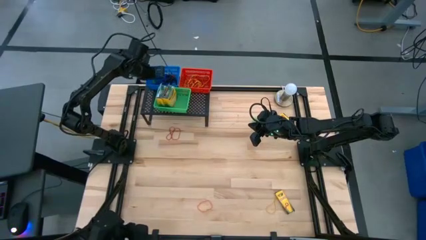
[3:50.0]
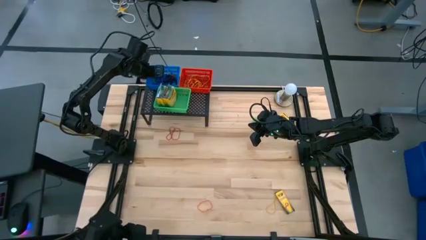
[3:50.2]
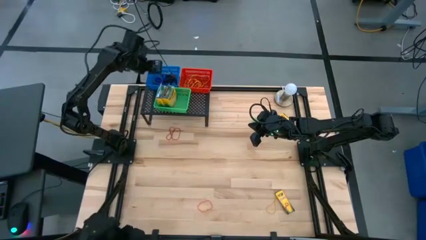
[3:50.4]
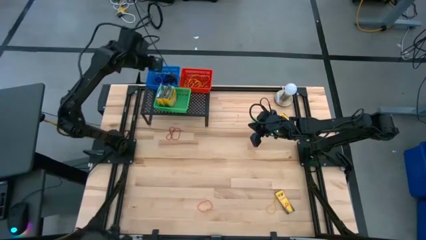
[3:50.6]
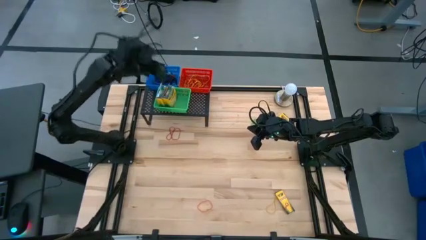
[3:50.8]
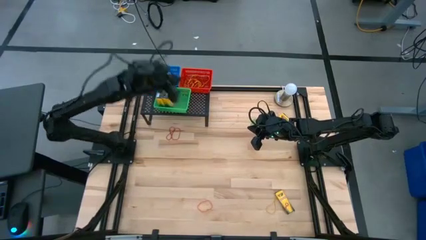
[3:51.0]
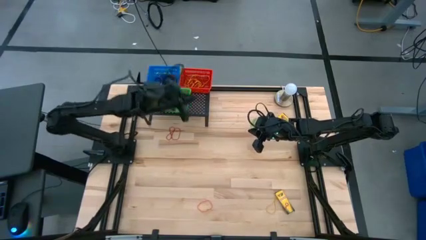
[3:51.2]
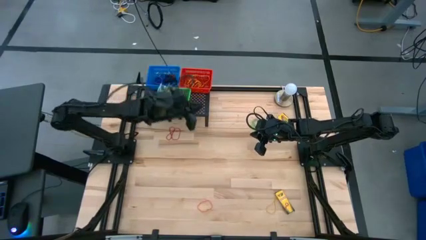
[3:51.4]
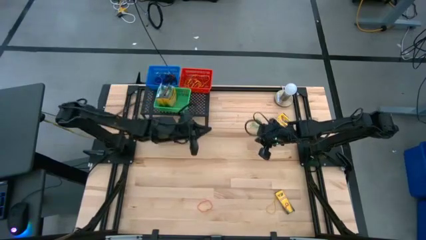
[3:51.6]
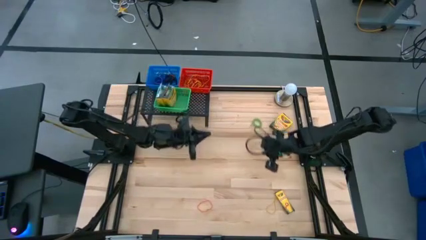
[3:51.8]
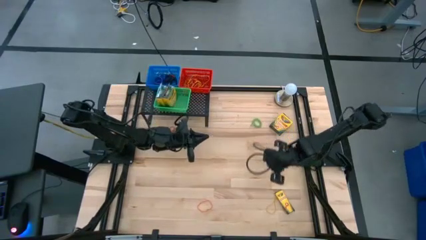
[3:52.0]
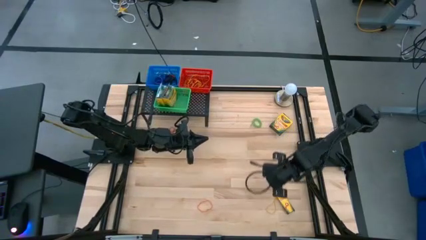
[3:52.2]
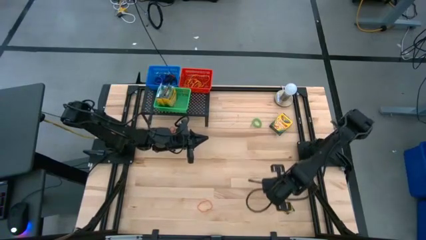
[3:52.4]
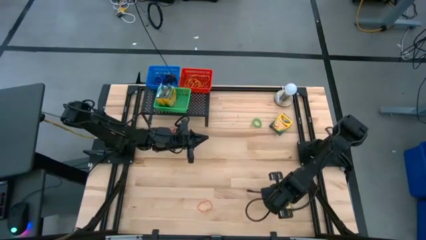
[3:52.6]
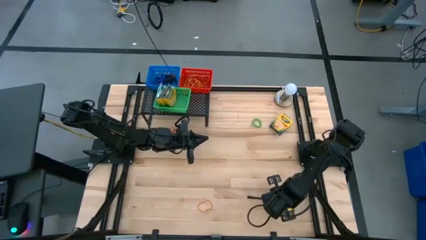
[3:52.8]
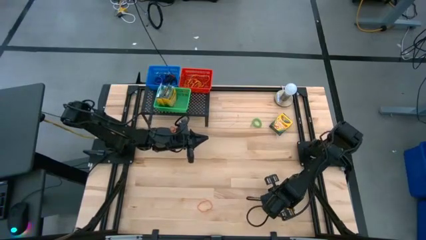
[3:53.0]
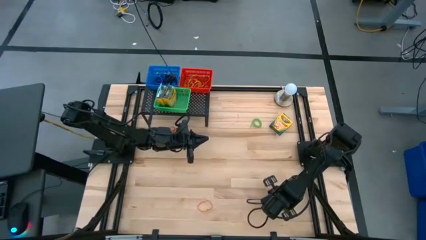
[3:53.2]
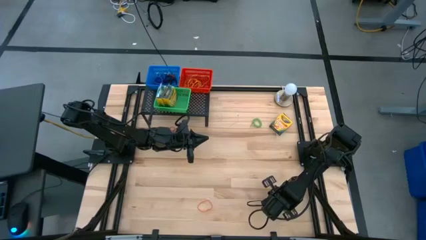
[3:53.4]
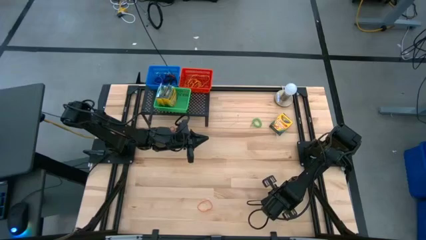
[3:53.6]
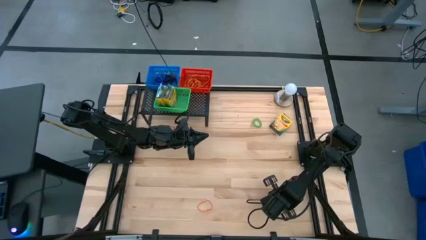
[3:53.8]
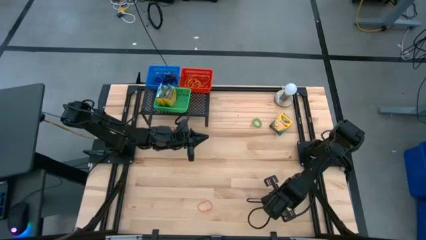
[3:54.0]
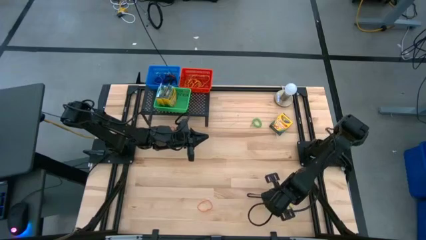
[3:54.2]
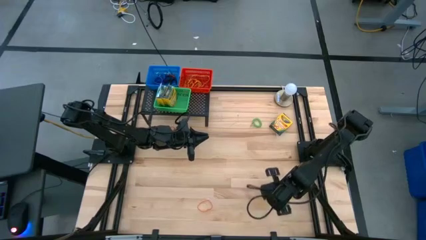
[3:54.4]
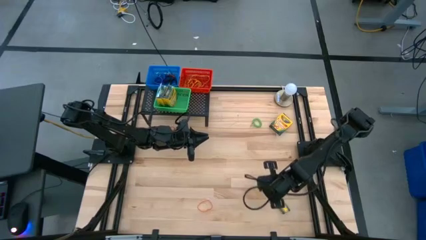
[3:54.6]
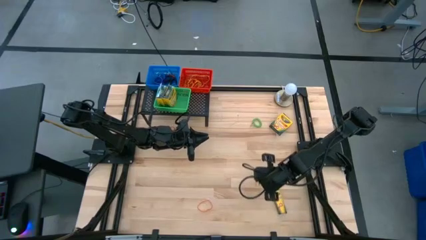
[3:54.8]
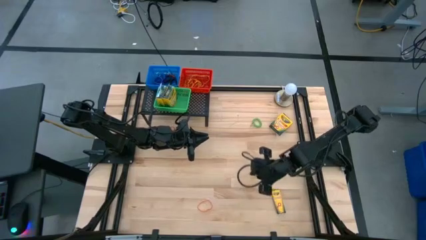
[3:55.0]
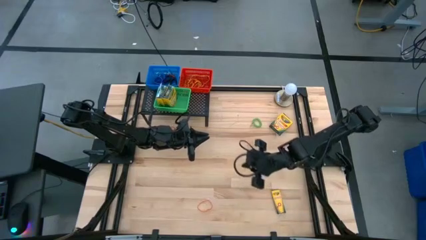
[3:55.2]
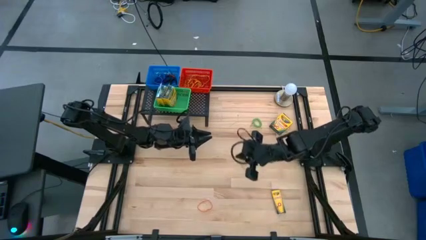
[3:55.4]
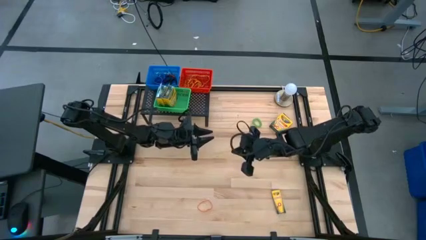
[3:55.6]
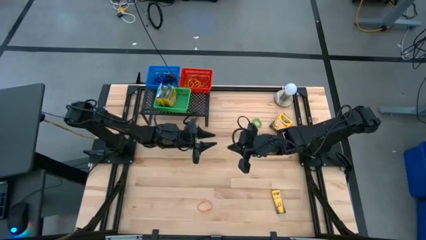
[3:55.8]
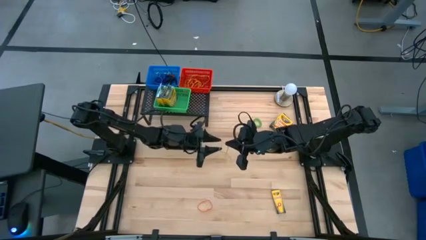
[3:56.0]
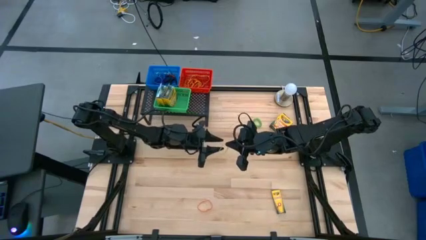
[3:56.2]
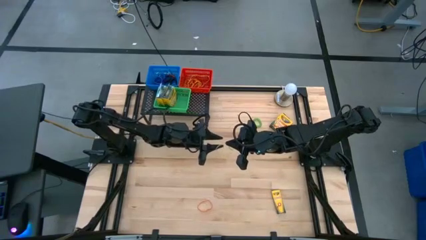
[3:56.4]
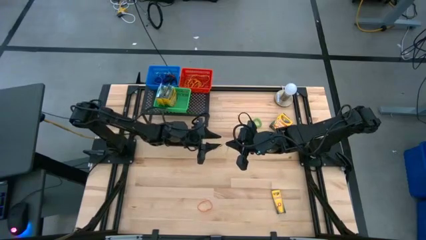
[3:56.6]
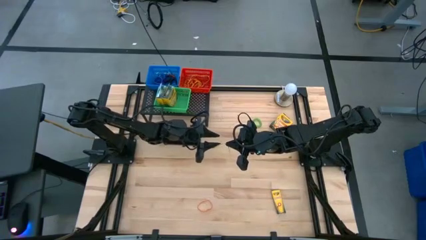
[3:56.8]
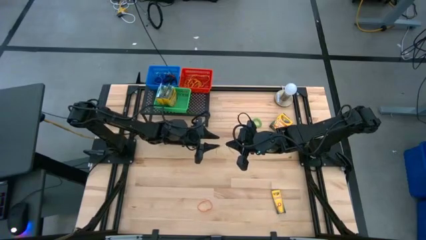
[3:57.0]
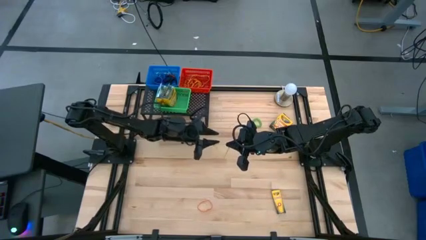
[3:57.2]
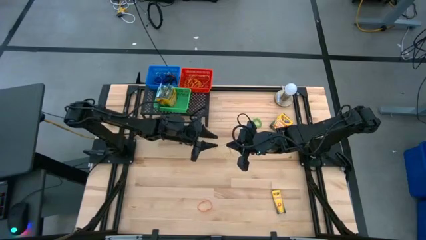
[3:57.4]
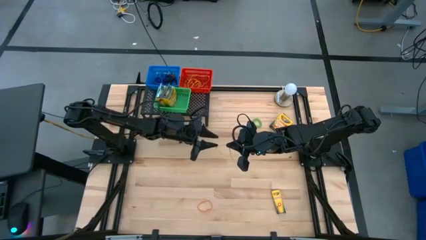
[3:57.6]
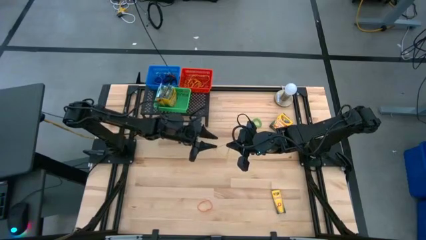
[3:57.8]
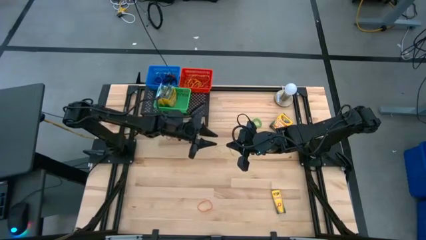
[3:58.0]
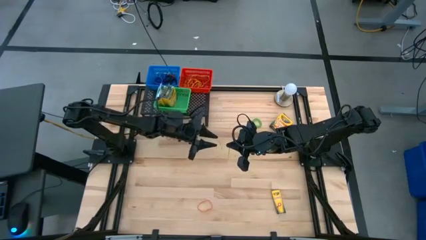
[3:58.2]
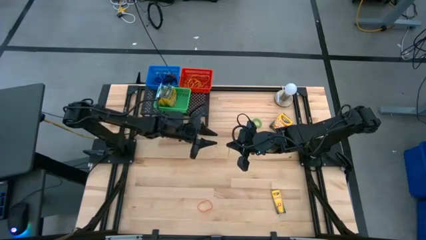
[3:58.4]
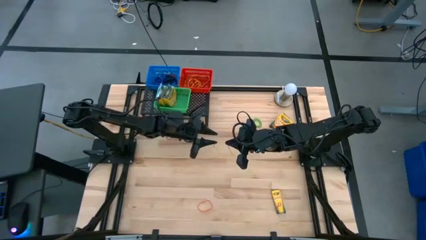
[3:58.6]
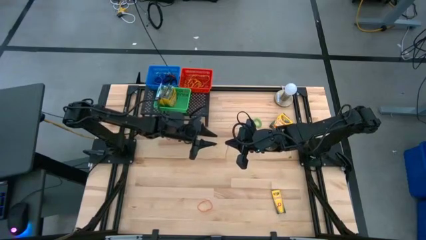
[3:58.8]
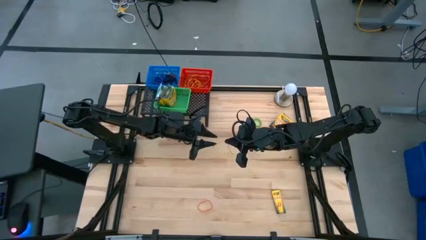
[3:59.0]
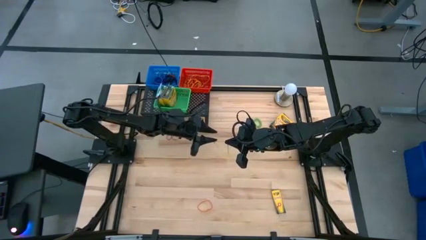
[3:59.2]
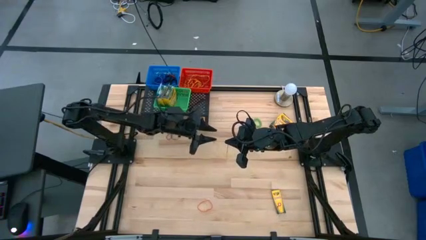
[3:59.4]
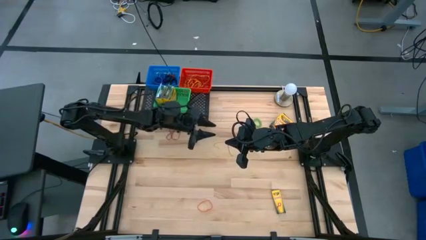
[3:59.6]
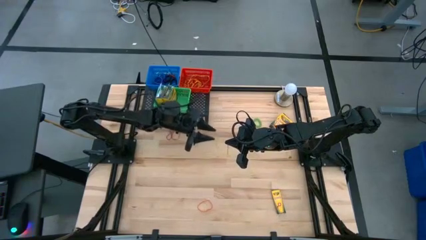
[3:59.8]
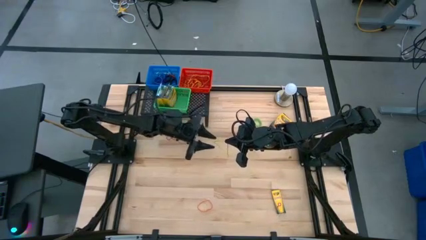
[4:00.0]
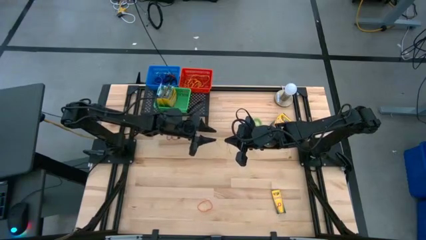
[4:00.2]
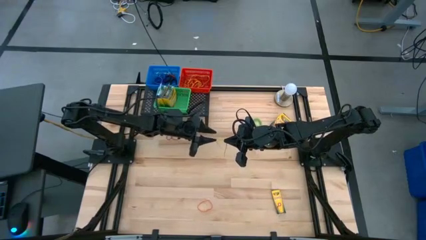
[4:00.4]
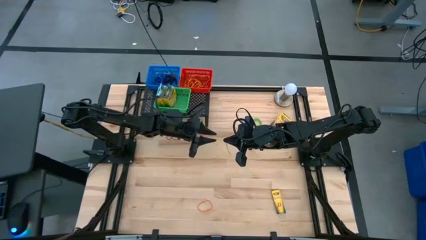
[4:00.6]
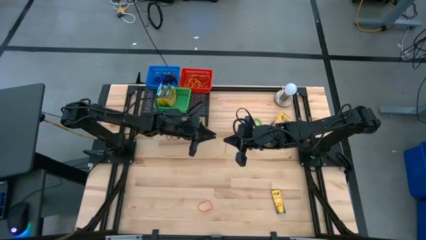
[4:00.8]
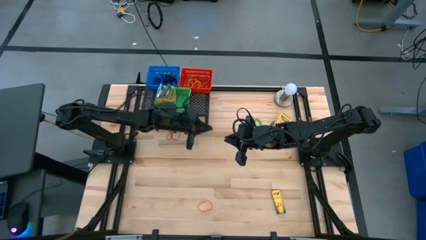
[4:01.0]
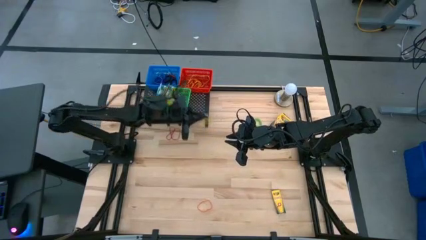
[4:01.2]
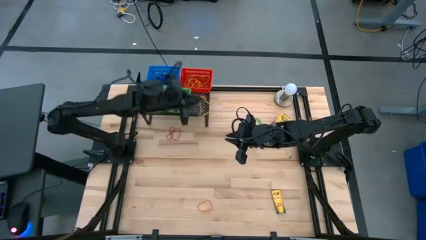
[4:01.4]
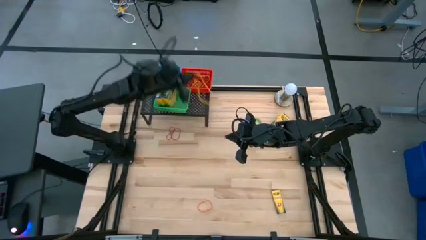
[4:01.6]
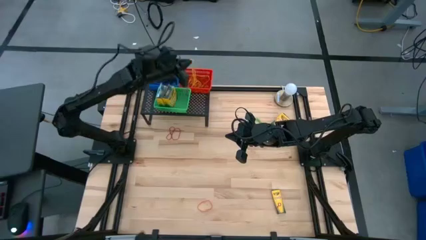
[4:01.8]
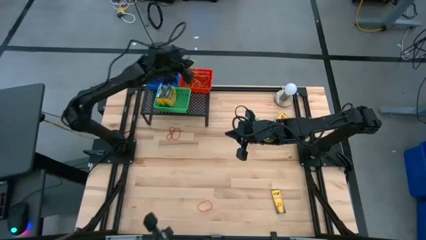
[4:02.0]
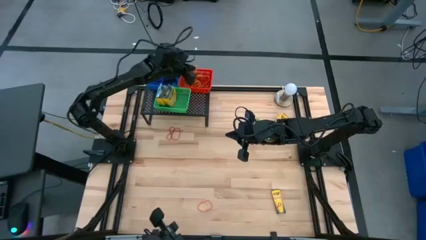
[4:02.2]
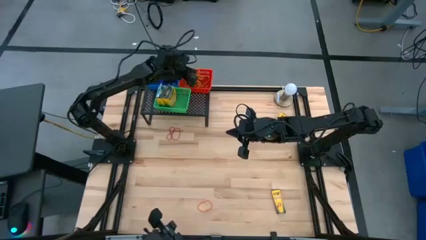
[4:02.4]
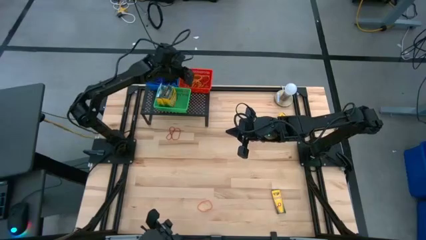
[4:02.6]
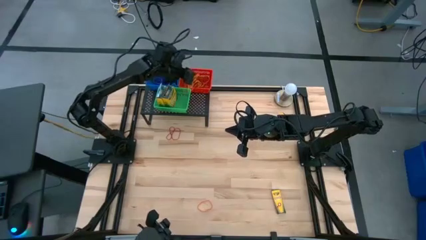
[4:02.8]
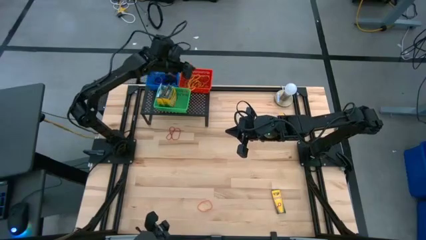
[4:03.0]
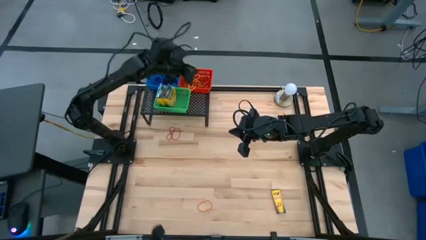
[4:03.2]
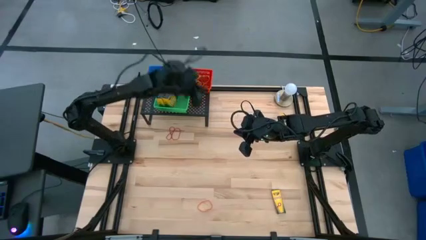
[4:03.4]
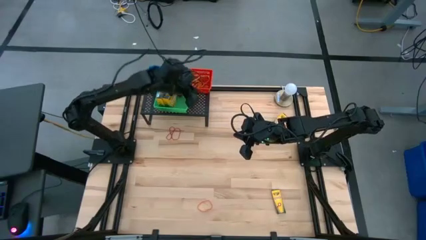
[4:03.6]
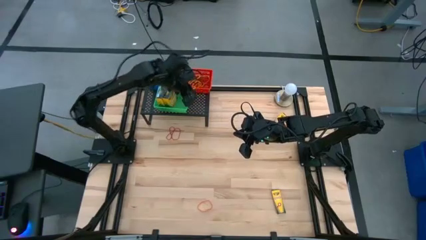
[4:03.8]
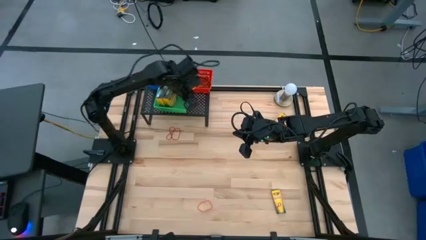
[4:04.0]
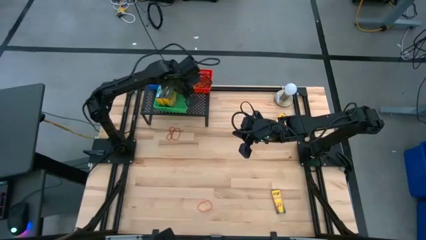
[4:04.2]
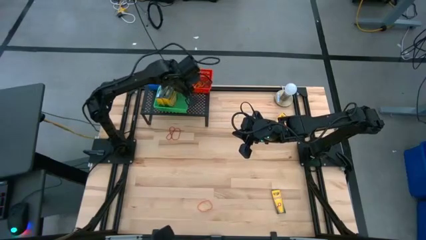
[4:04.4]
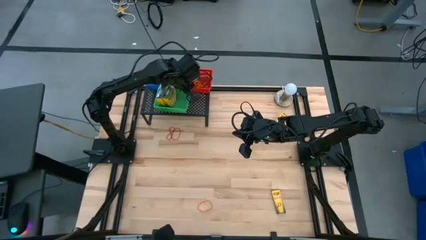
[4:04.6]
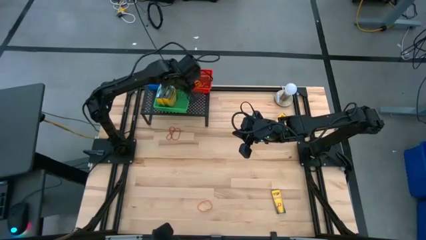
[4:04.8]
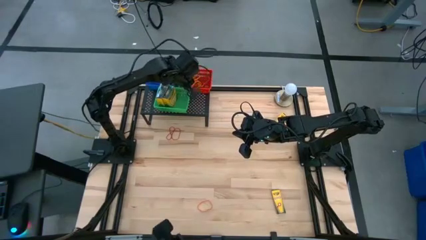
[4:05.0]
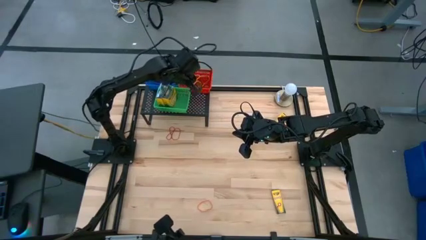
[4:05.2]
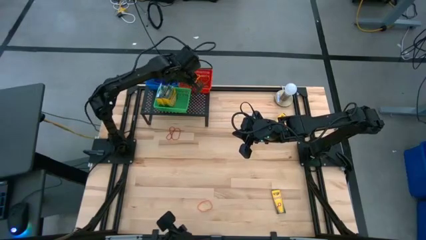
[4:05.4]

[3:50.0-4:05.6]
Task: Pick & Place Office Desk Supplies
Put the yellow rubber band into the red bin
